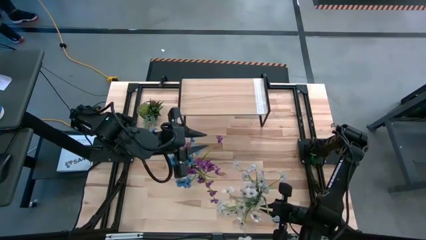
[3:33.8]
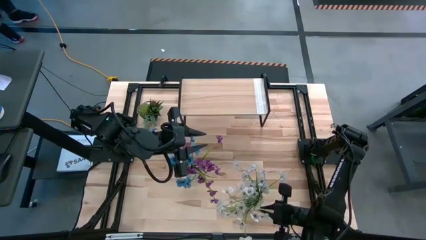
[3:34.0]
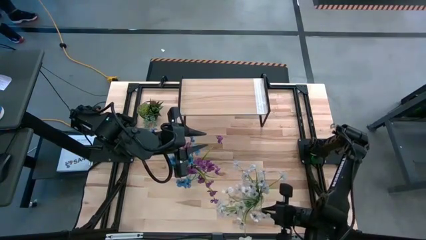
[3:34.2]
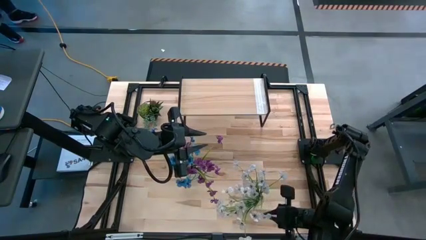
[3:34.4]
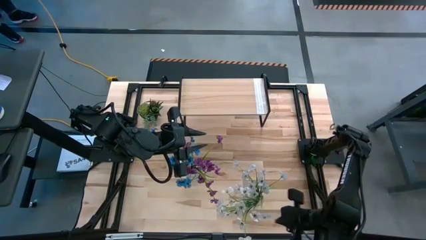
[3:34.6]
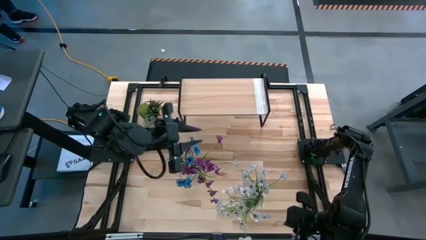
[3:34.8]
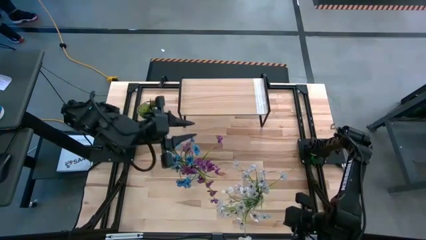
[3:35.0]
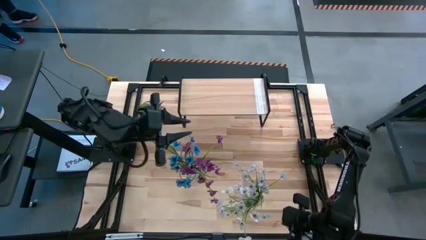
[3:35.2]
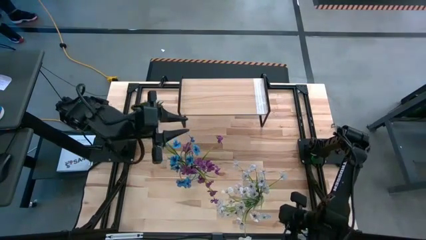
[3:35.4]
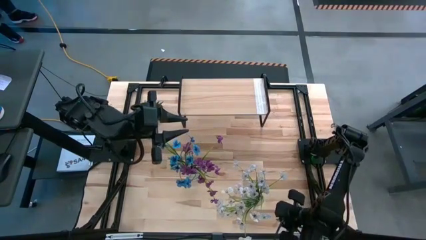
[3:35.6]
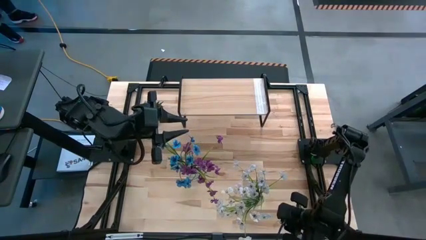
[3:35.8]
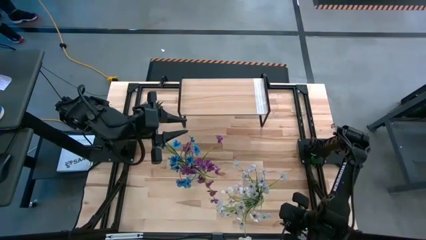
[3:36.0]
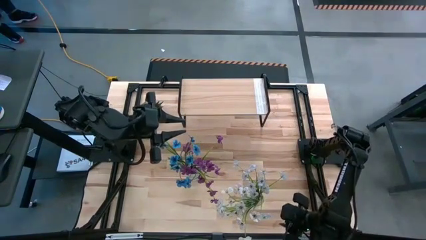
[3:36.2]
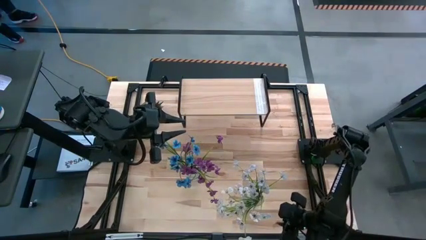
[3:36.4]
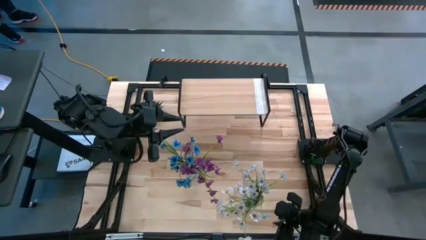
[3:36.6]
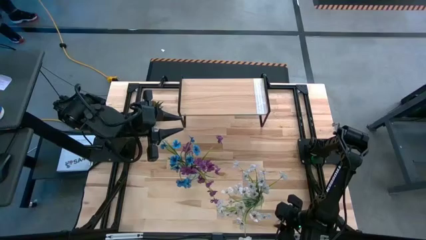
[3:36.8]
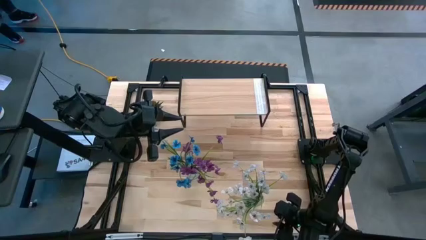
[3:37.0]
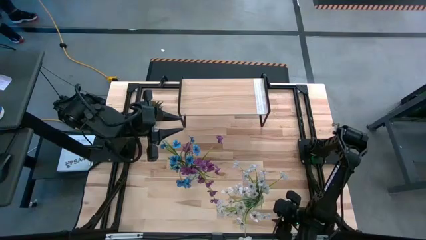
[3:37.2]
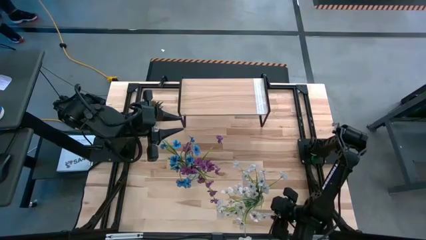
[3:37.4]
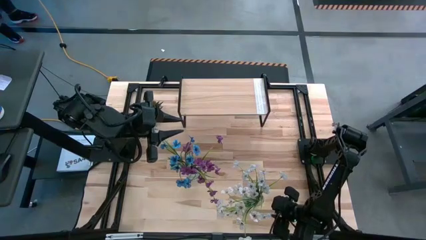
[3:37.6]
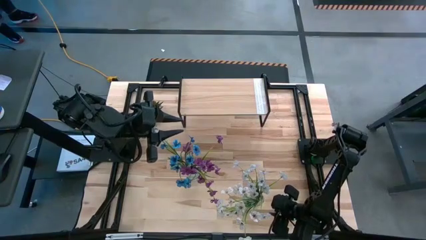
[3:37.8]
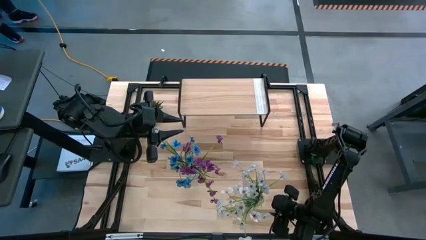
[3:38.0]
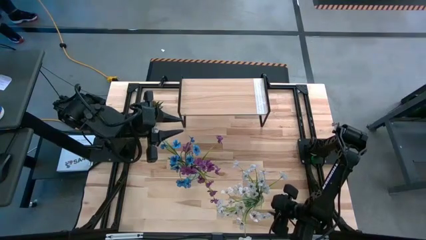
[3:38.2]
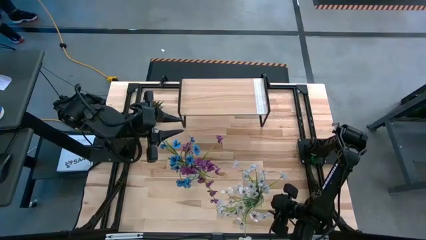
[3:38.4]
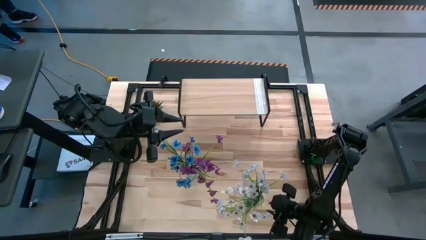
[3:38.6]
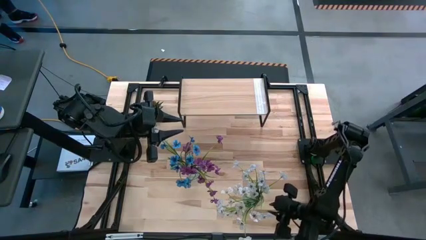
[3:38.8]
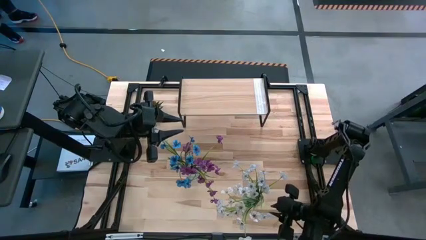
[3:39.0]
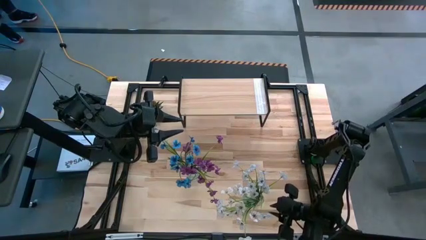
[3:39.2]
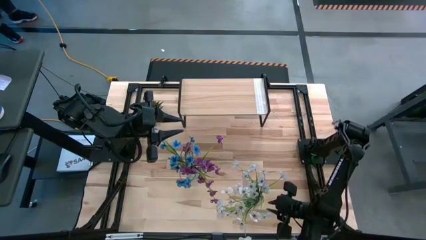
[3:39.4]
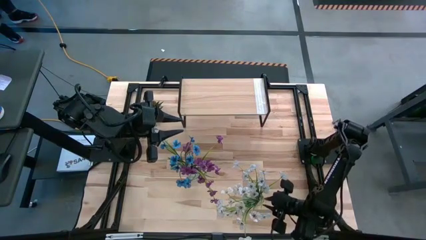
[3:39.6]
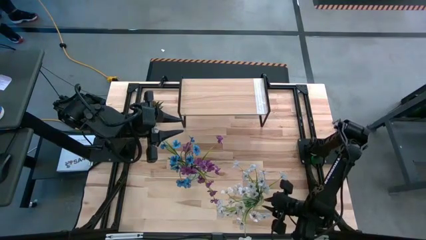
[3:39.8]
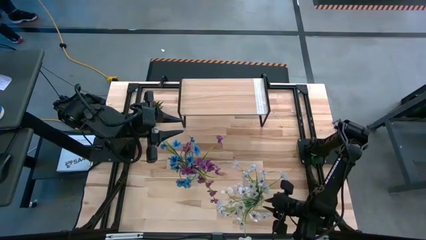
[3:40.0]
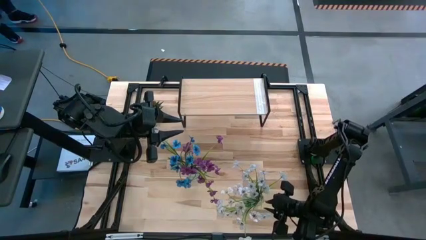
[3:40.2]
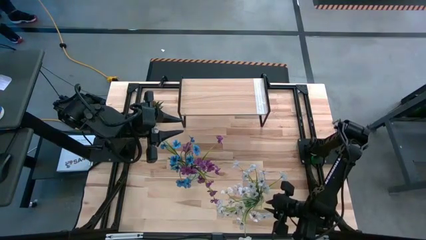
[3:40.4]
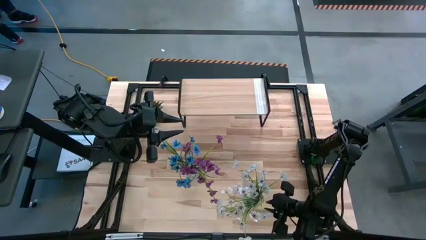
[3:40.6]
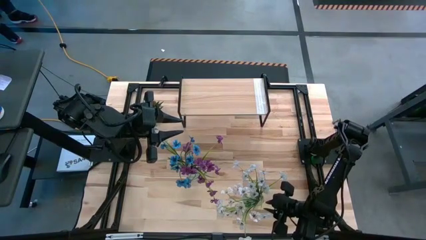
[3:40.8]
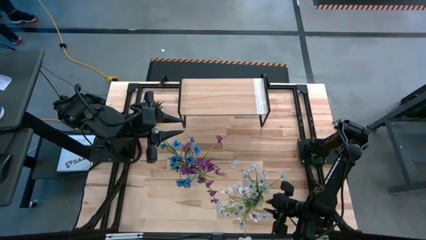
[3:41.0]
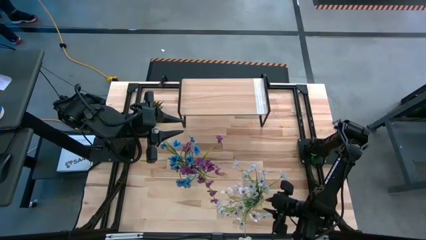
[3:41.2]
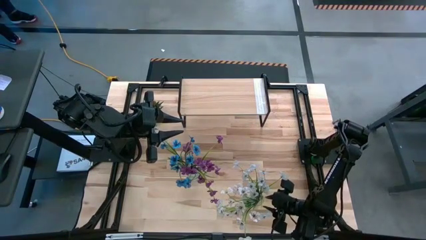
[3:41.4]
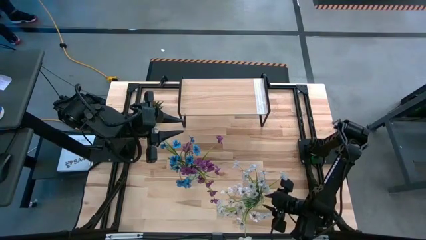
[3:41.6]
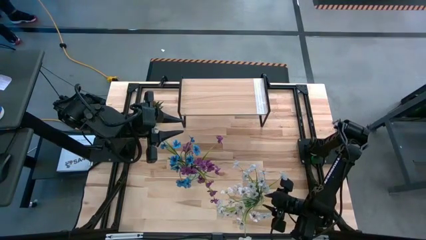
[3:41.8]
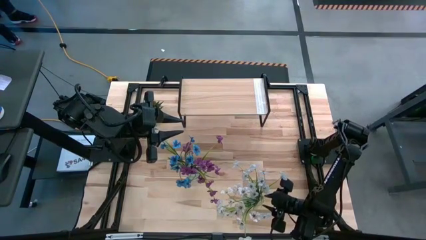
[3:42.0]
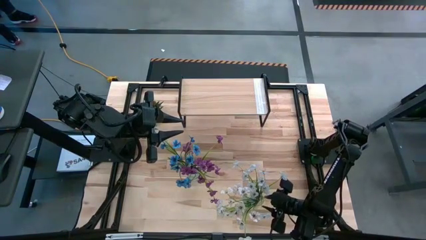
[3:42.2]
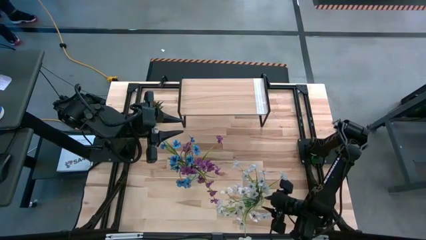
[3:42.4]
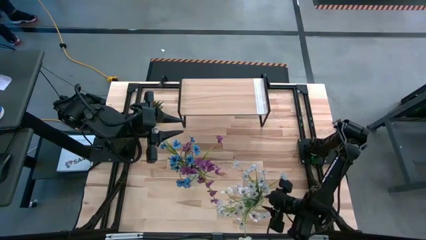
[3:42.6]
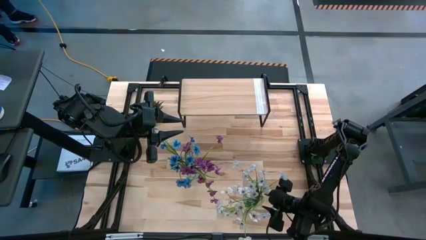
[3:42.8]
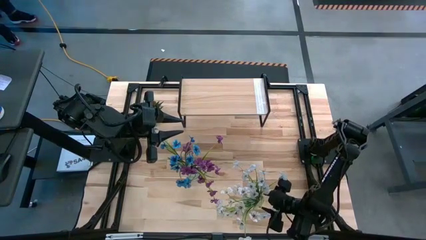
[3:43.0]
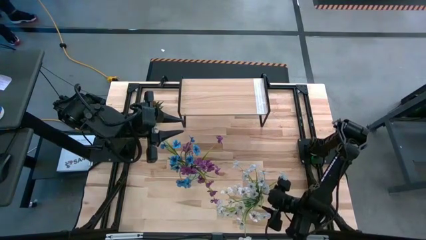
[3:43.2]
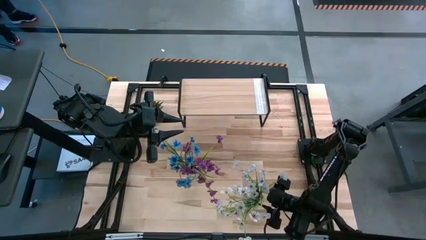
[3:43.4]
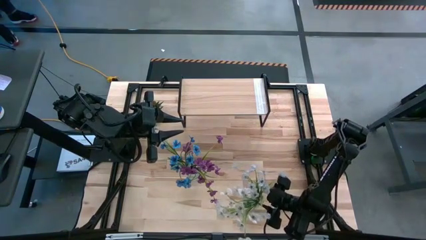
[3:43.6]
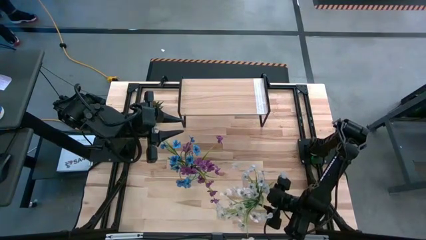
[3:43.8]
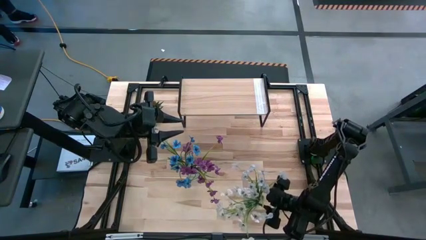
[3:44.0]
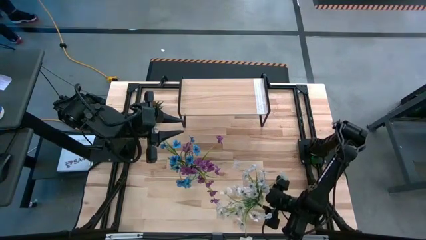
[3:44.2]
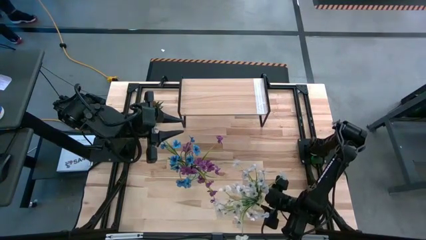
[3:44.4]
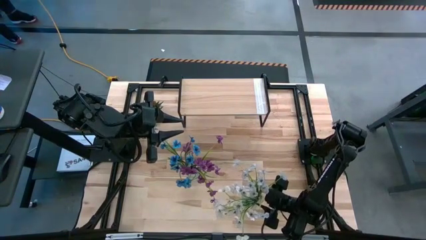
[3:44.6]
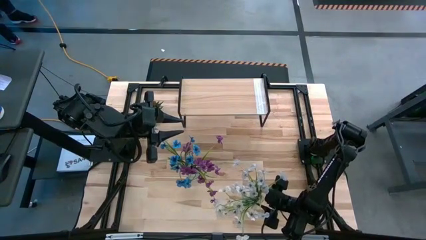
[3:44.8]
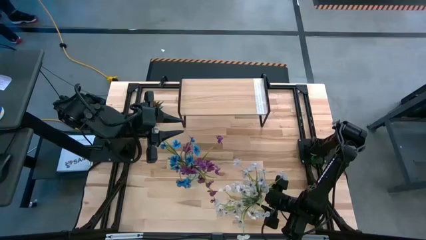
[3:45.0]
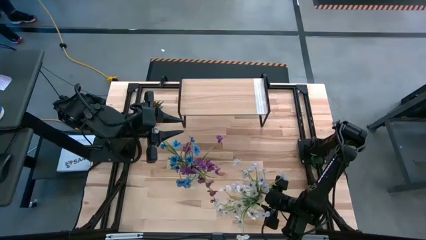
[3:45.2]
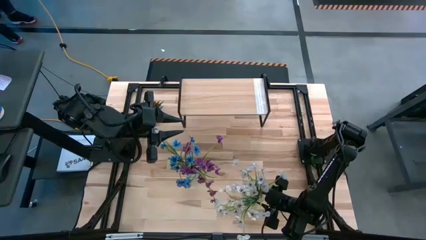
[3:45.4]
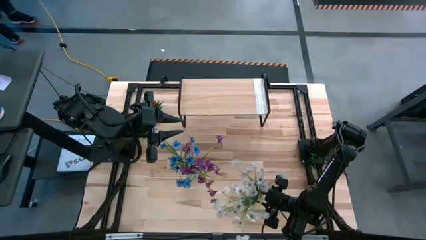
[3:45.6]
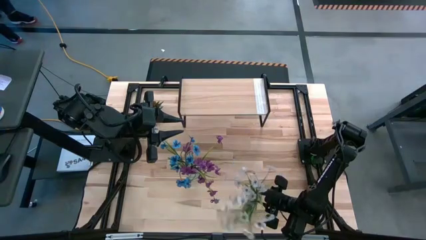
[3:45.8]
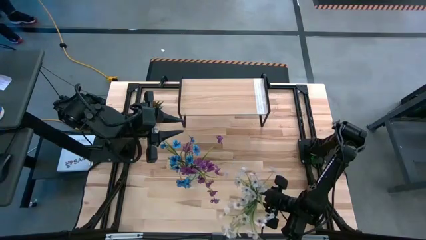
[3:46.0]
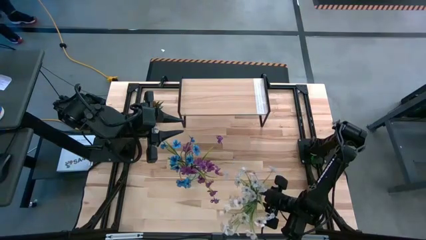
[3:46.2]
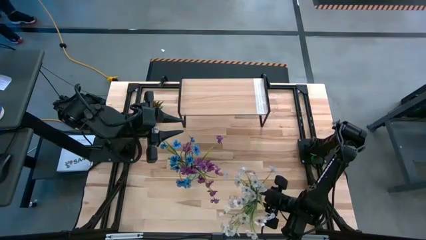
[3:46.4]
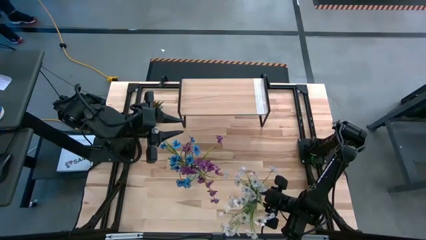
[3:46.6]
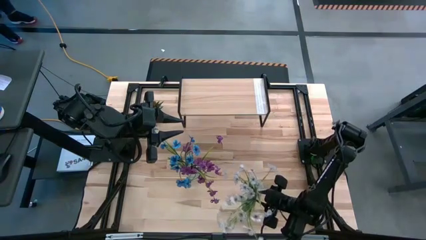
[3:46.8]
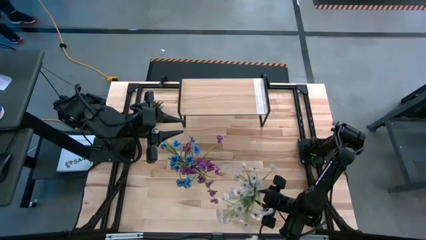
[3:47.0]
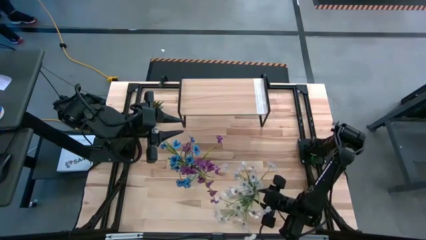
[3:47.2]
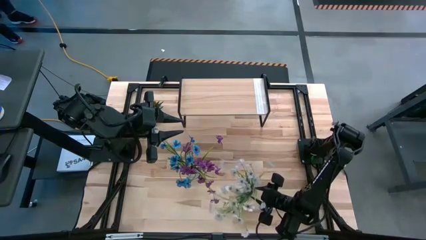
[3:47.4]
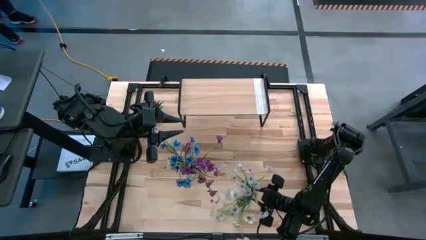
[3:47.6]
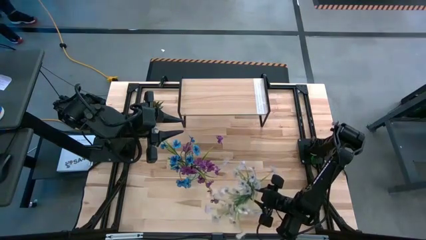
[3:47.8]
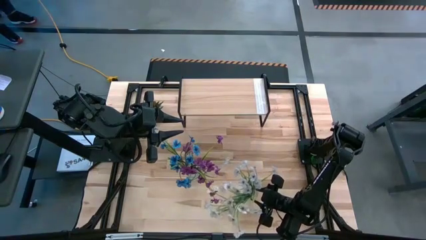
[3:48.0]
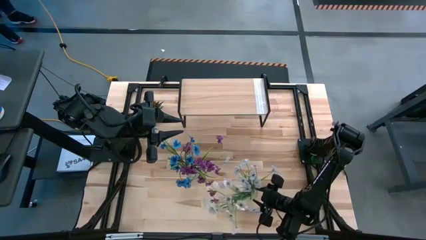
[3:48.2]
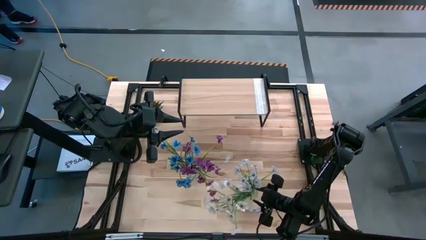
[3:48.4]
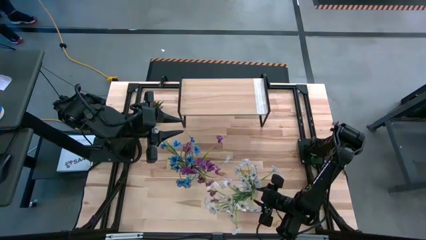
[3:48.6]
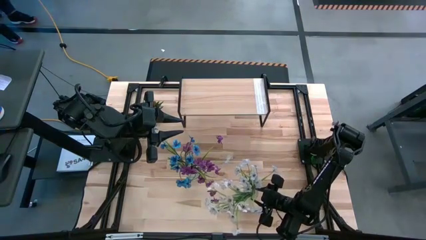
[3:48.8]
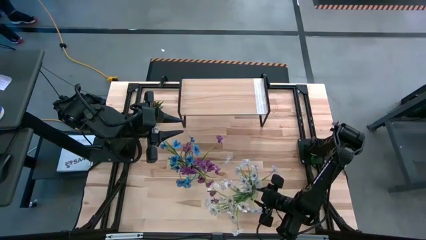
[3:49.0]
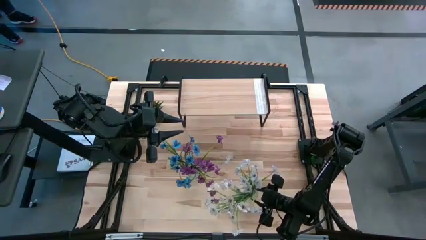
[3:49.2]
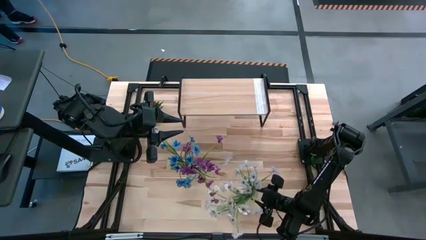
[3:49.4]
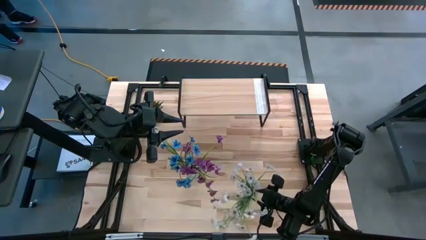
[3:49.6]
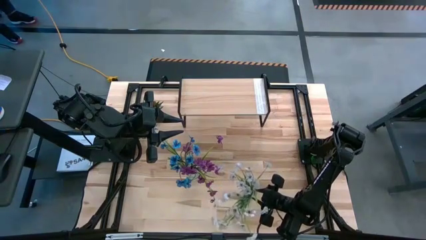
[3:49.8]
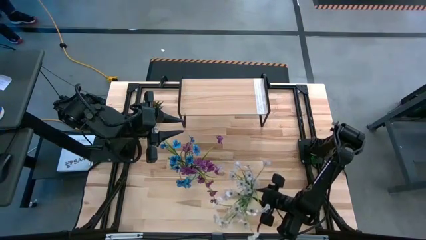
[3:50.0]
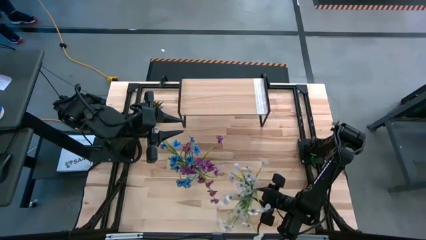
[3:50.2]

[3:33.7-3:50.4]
Task: Pick and place flowers into a vace then onto a shelf
Put the right transparent vase with flowers on the shelf
